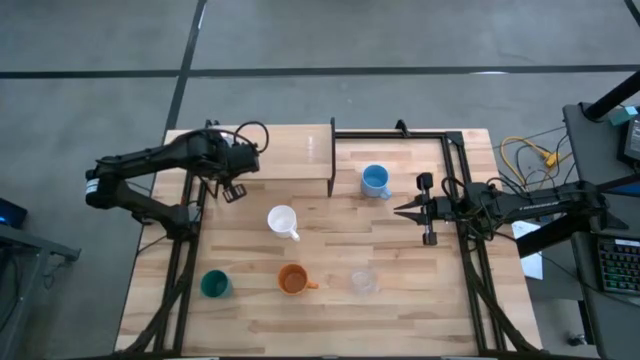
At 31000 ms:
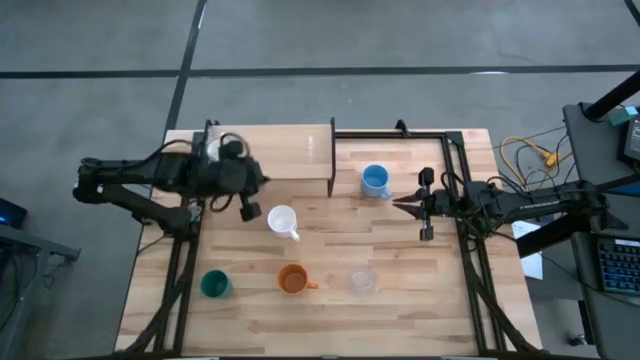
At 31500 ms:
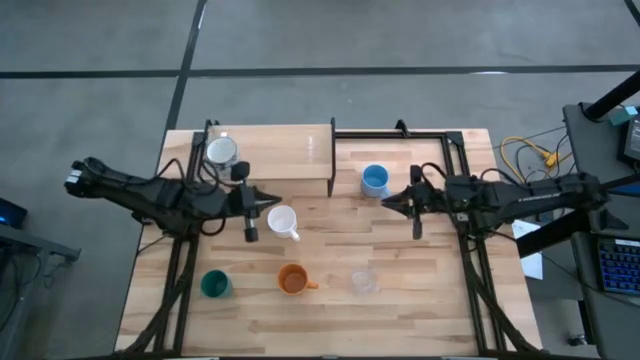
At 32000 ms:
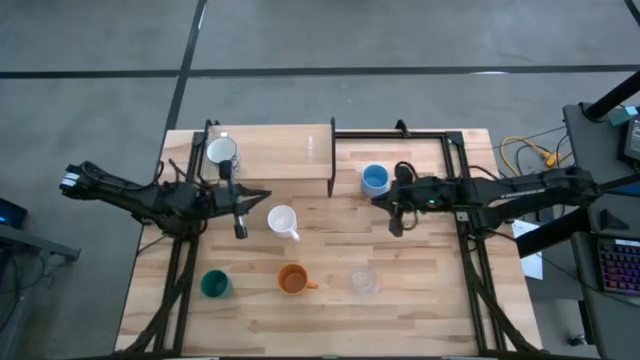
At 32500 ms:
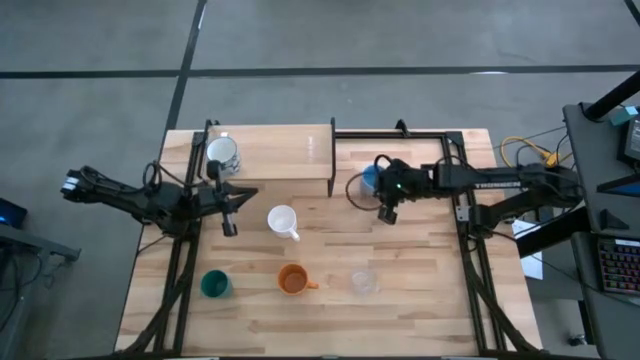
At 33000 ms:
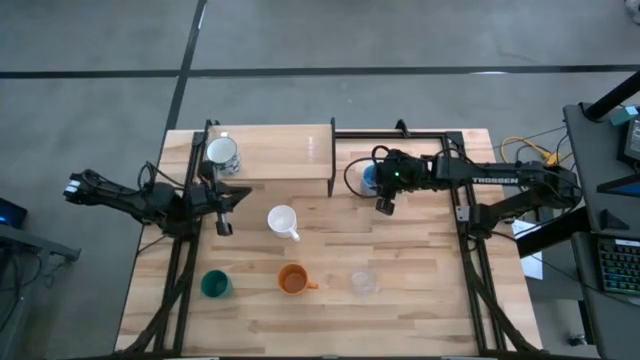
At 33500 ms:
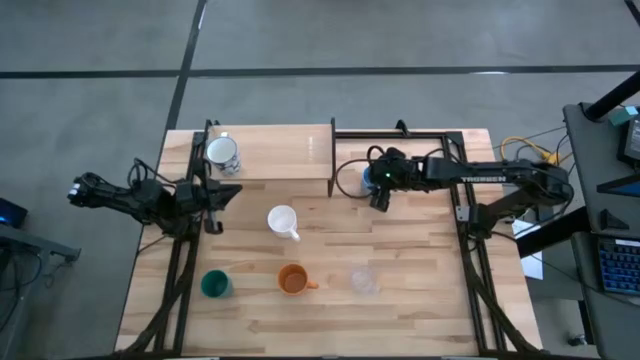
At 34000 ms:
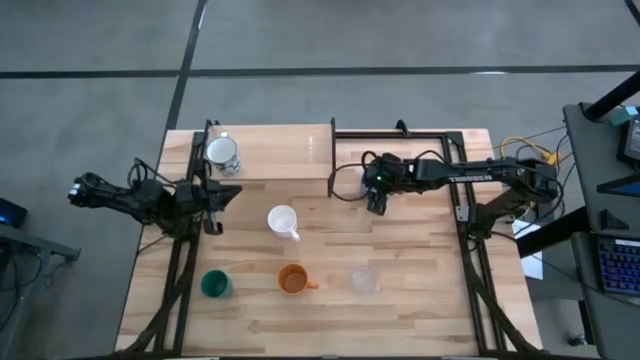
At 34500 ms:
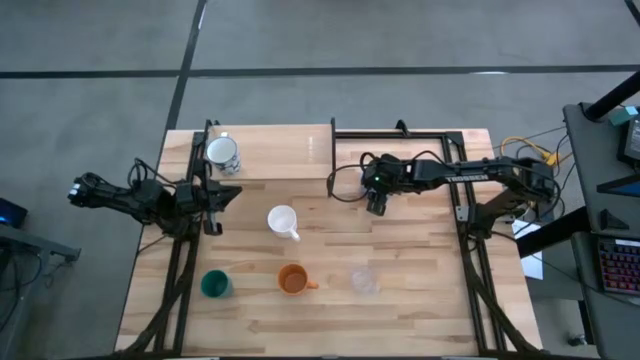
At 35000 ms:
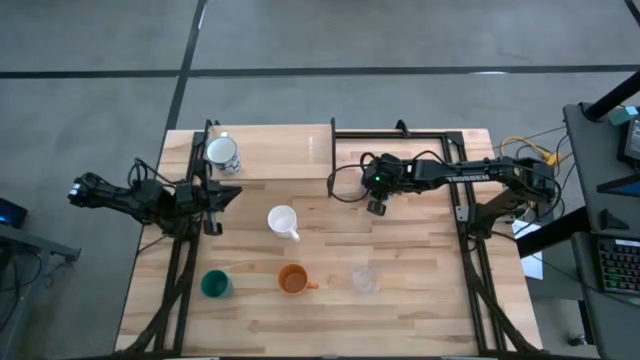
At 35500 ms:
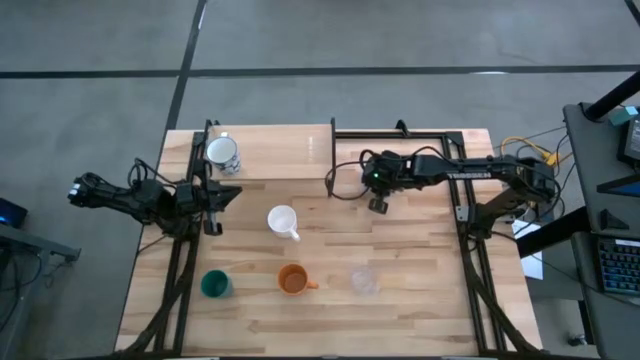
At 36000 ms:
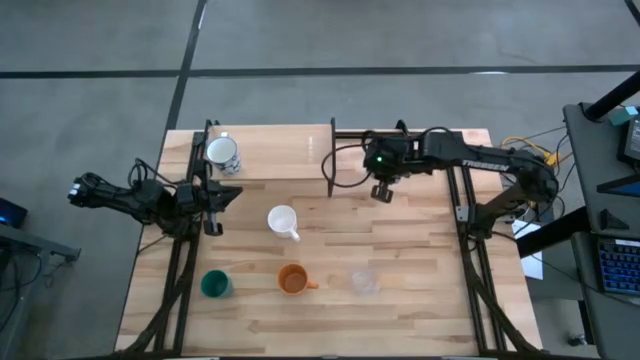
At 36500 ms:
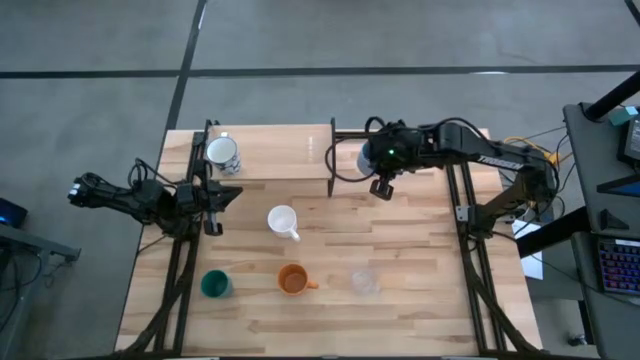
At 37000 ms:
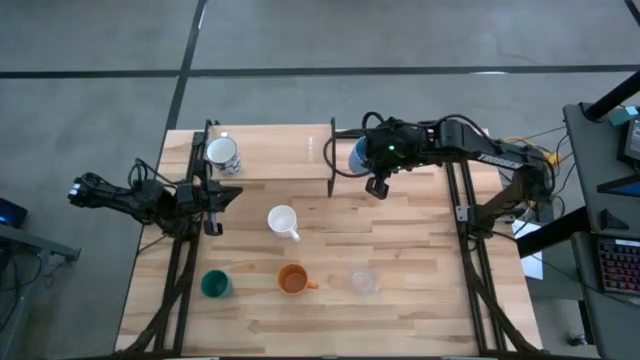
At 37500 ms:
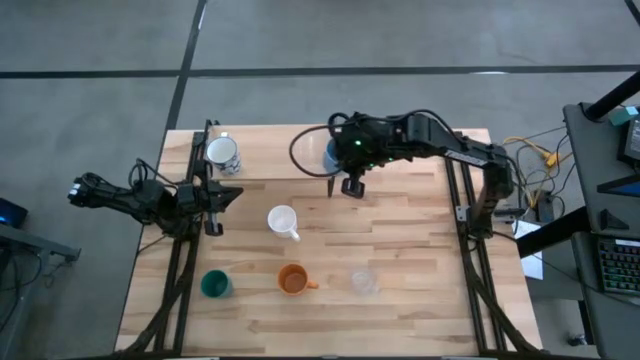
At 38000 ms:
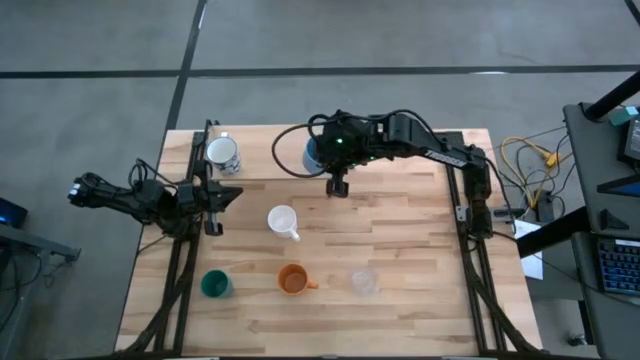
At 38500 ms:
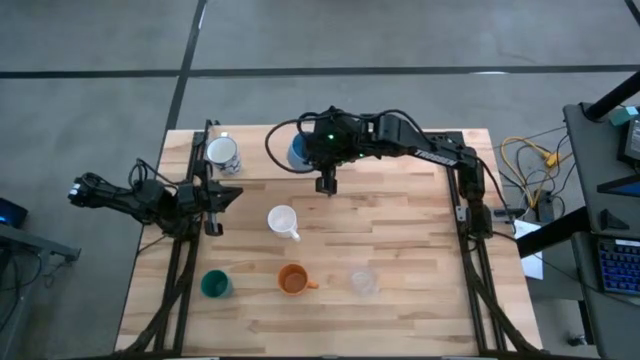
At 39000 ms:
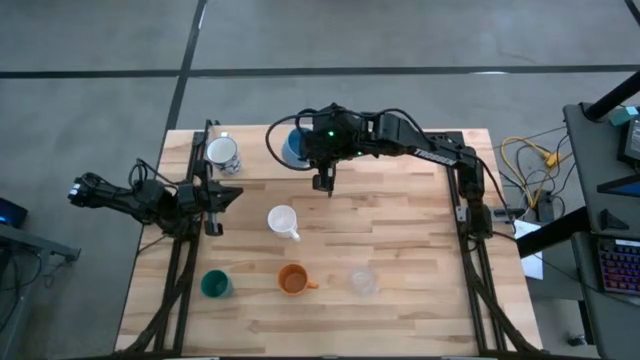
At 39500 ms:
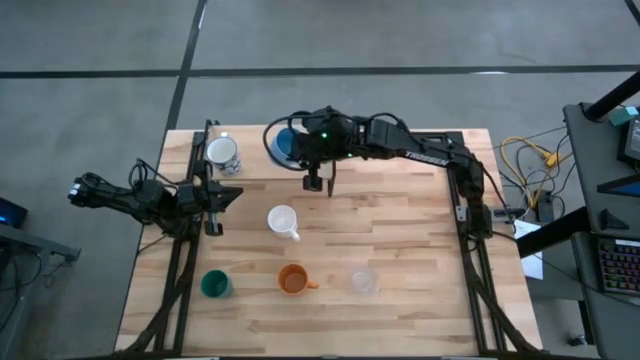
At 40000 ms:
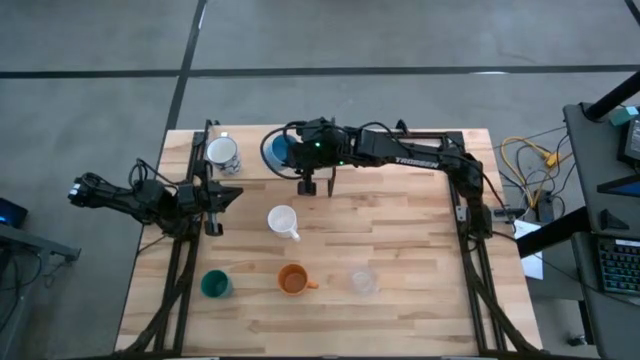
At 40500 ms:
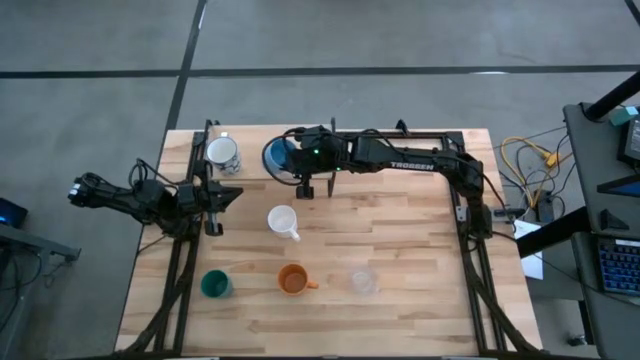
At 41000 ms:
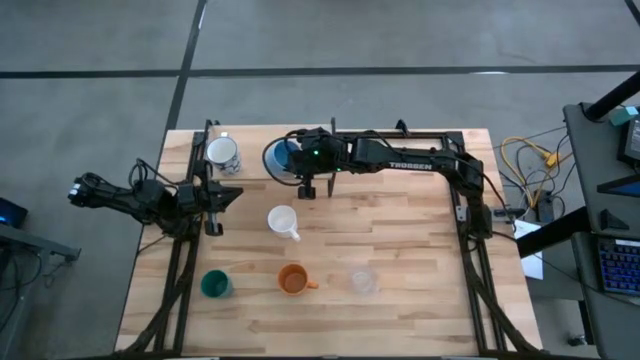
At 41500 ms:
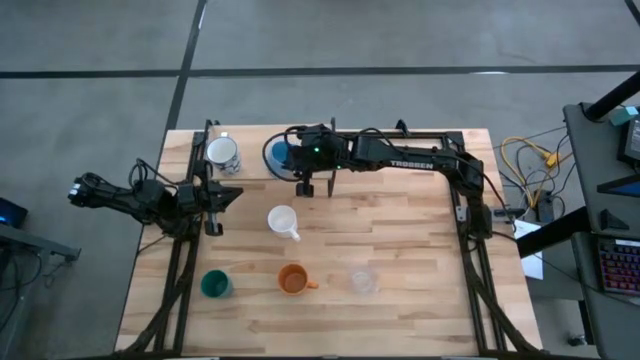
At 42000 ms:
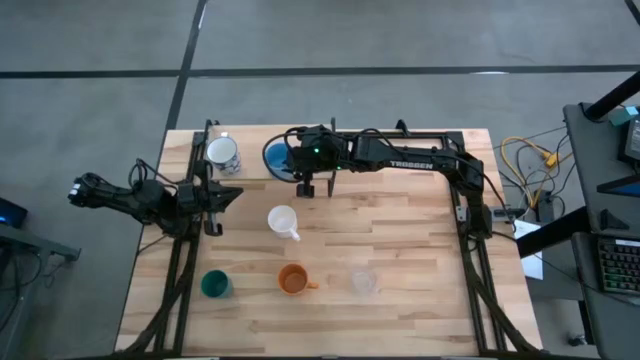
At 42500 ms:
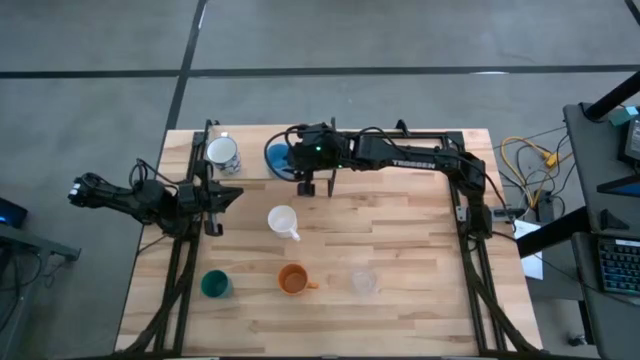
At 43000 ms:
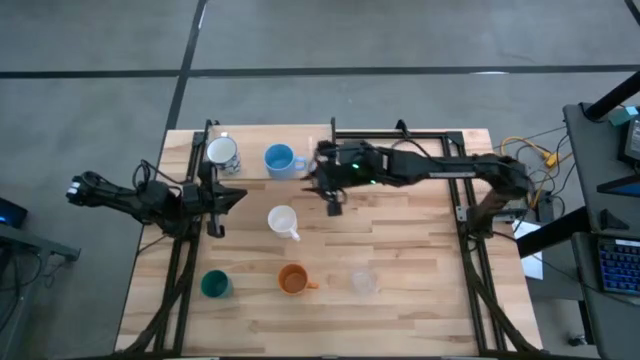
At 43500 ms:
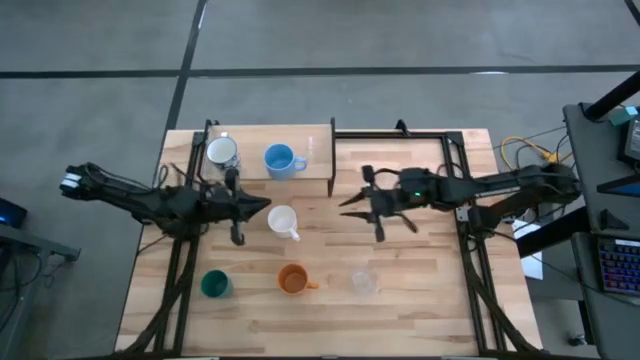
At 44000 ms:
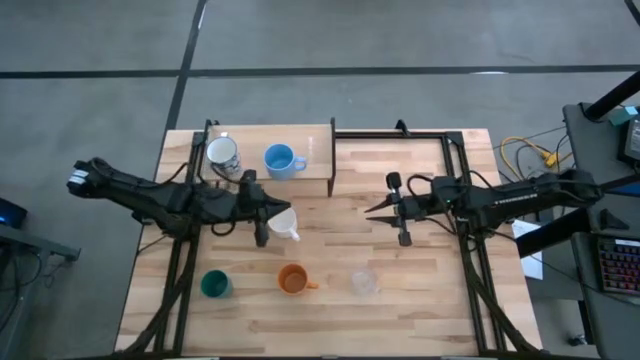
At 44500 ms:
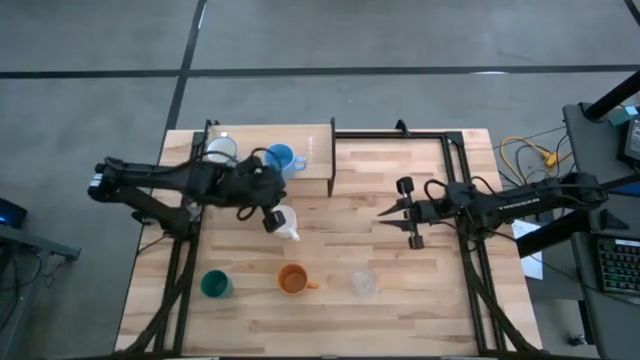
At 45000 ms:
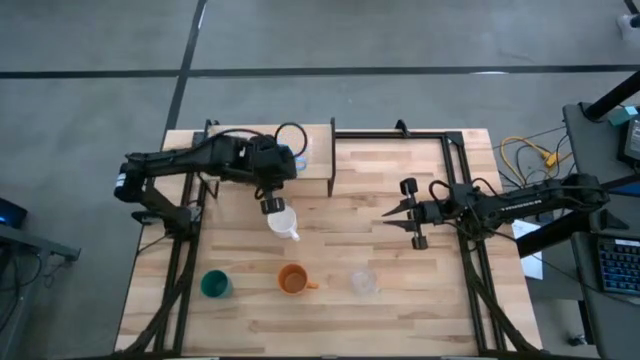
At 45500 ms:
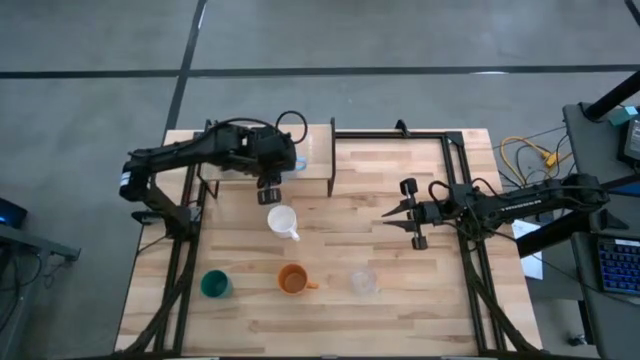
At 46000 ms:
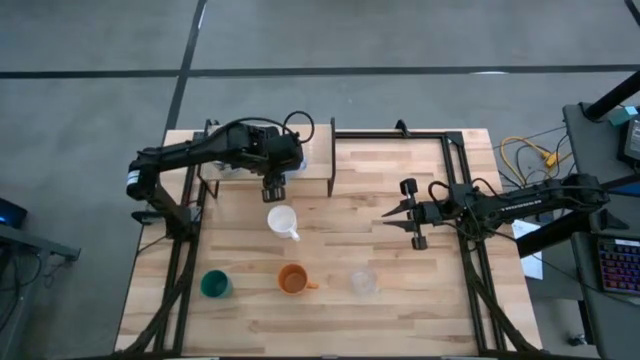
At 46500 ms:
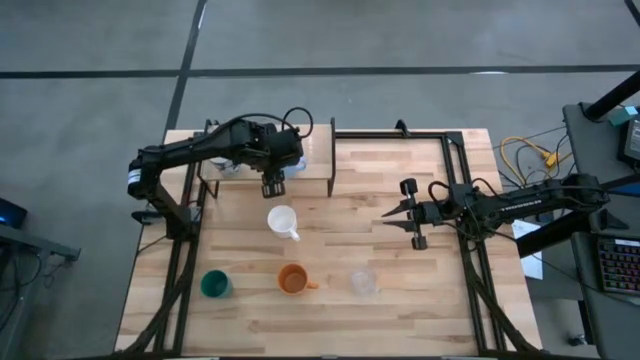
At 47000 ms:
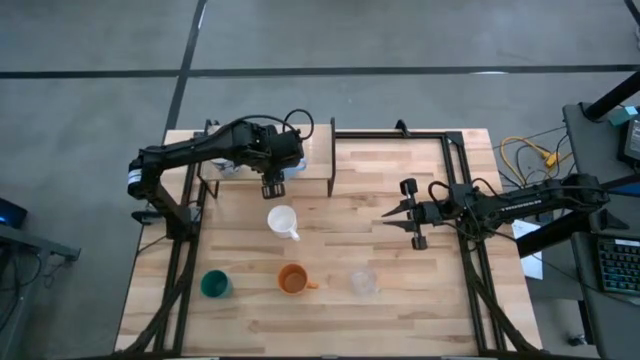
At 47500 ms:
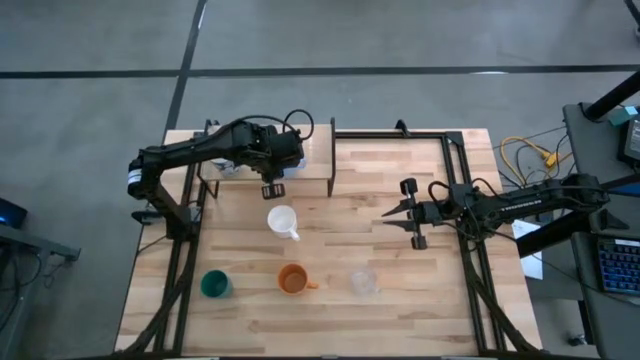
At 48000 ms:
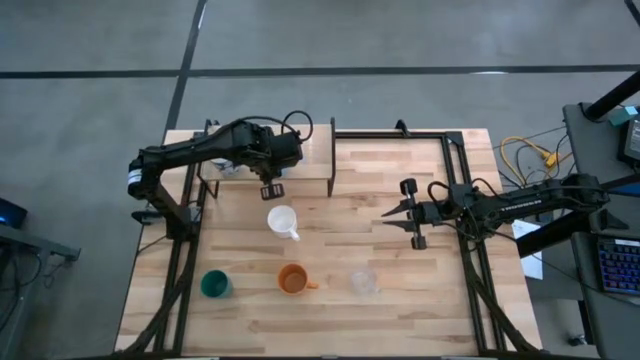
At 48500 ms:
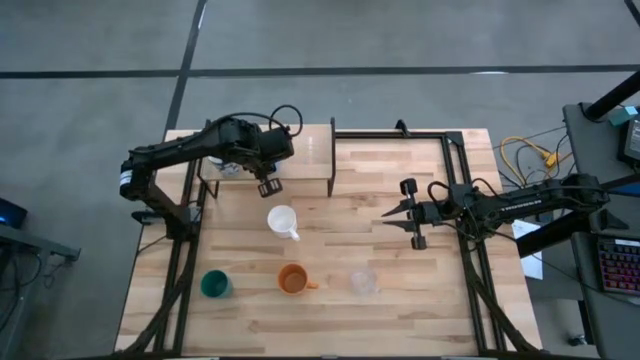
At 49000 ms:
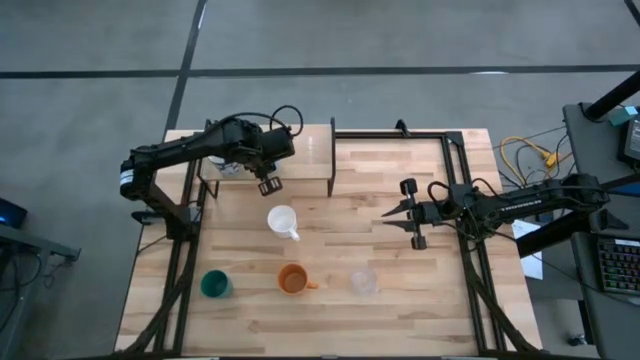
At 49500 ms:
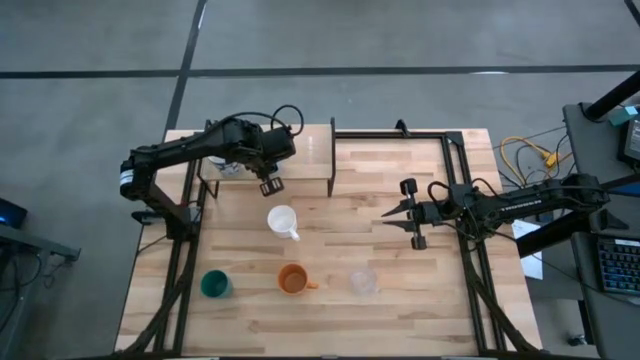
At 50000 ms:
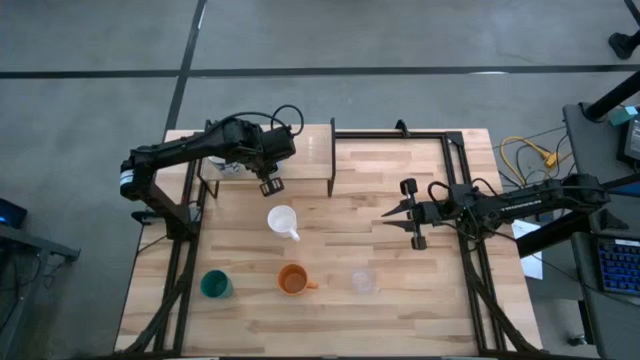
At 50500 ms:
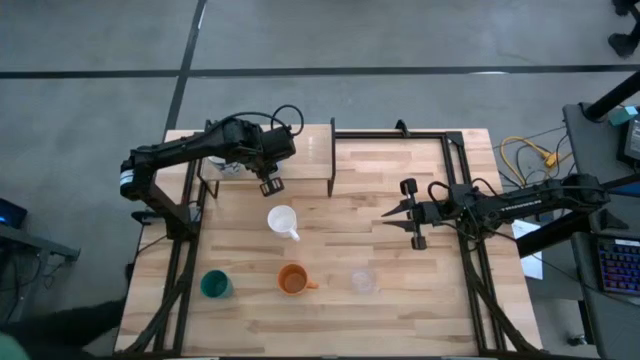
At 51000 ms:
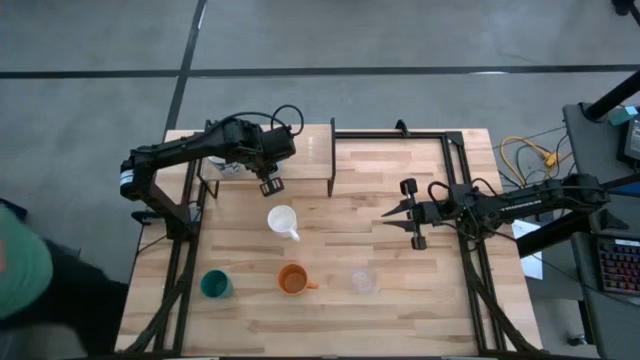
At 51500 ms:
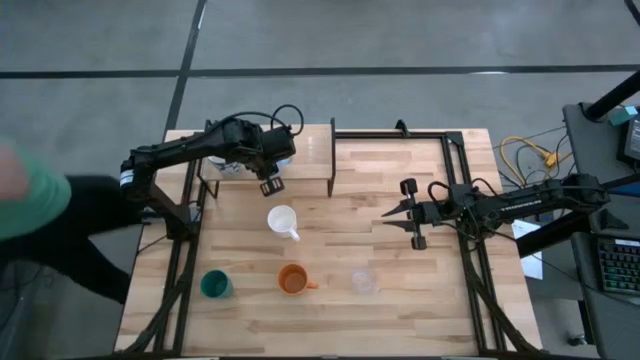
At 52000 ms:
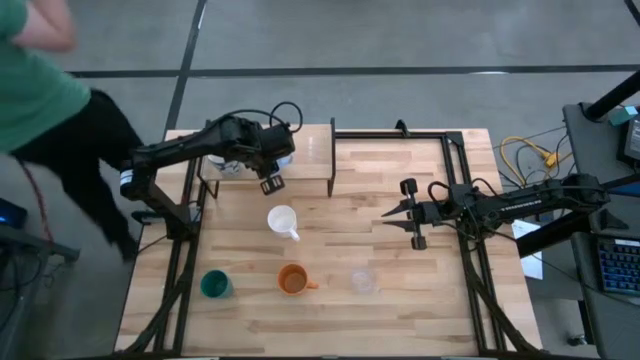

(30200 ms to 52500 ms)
Task: Stack small to large cups/mugs on shelf
Put the blue mug on the shelf
